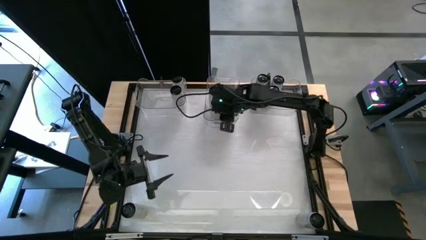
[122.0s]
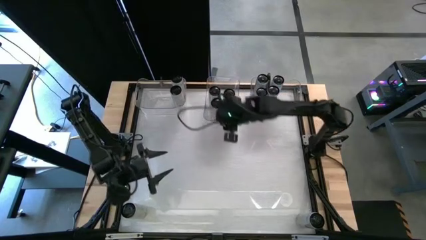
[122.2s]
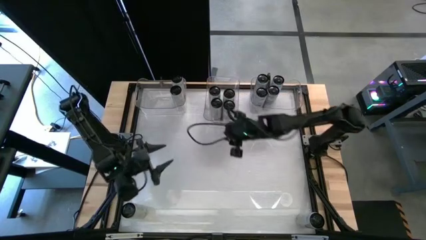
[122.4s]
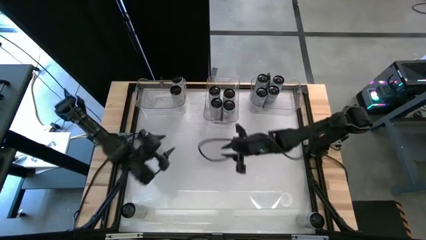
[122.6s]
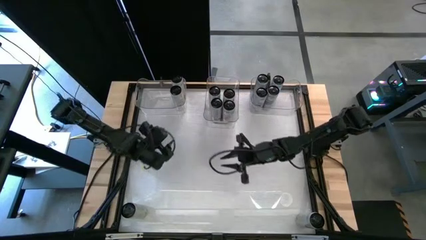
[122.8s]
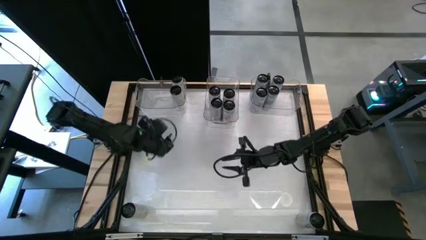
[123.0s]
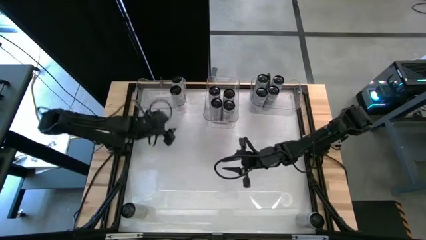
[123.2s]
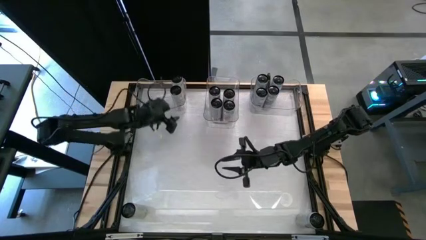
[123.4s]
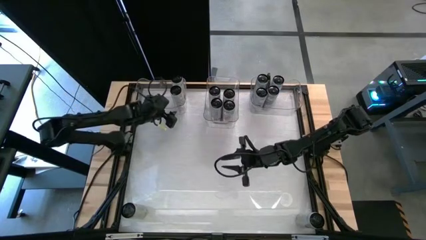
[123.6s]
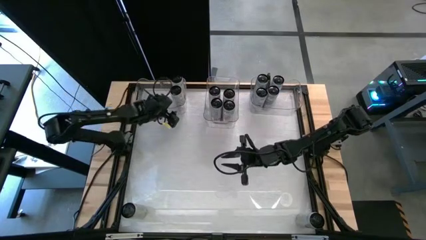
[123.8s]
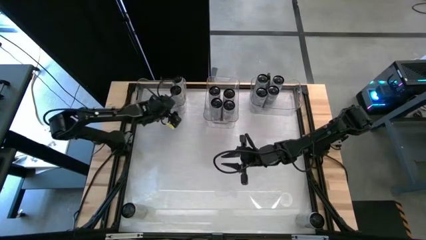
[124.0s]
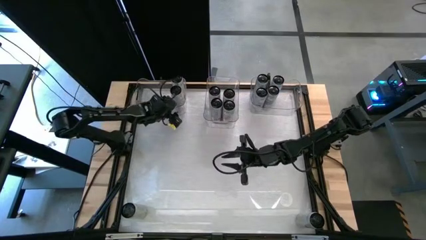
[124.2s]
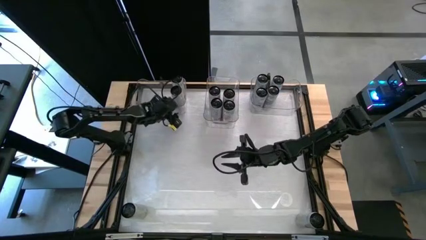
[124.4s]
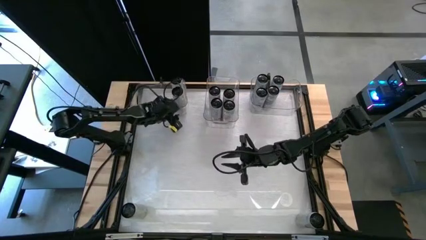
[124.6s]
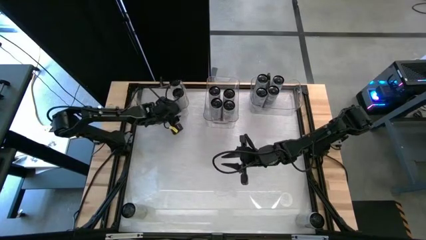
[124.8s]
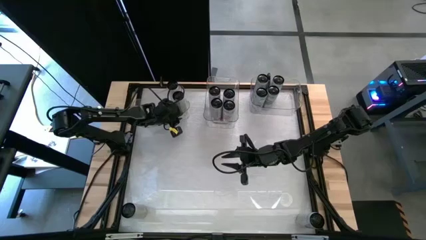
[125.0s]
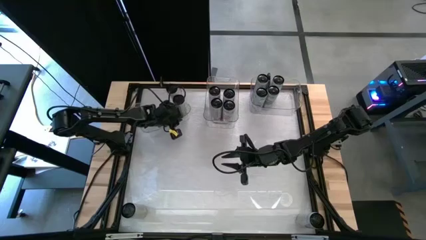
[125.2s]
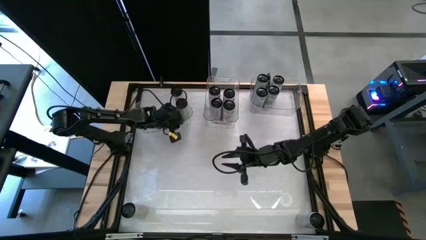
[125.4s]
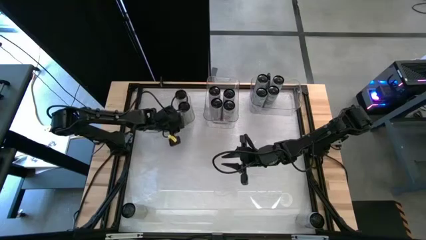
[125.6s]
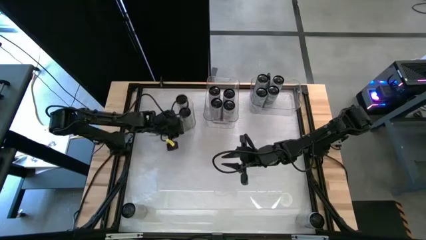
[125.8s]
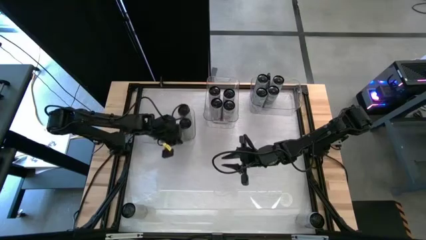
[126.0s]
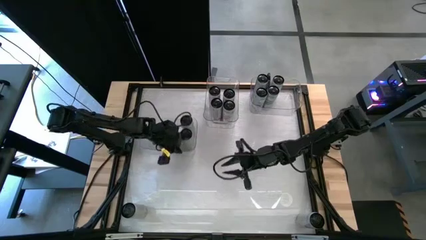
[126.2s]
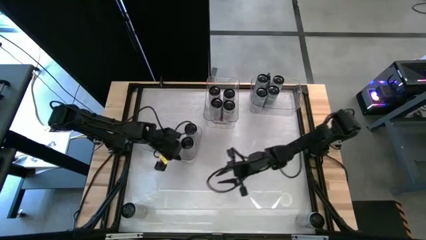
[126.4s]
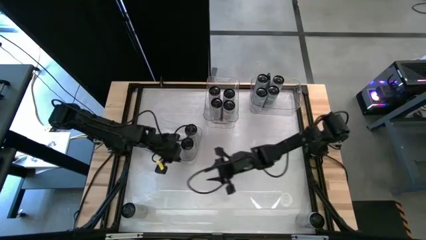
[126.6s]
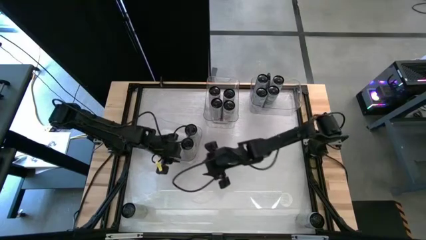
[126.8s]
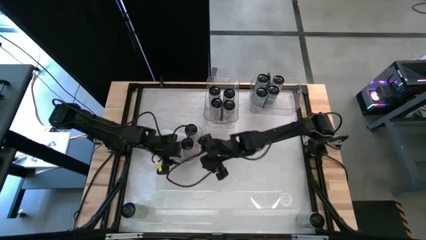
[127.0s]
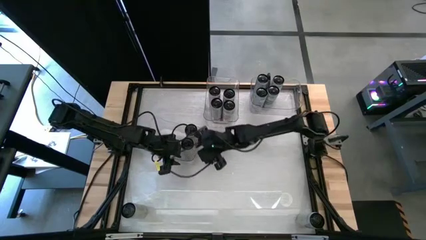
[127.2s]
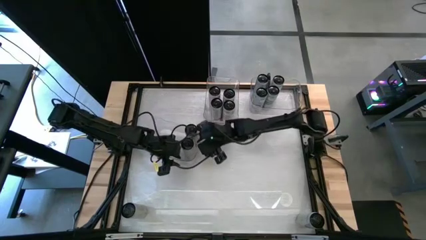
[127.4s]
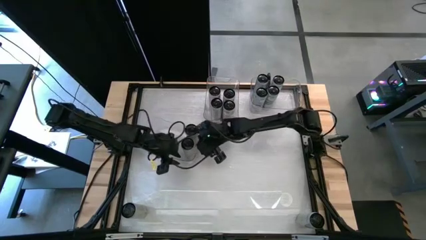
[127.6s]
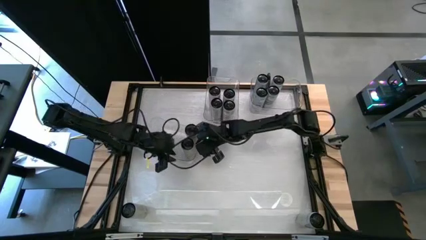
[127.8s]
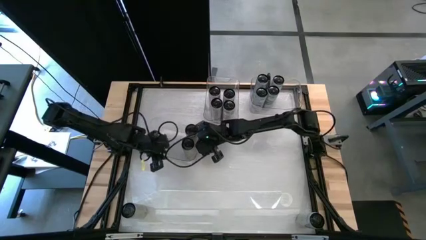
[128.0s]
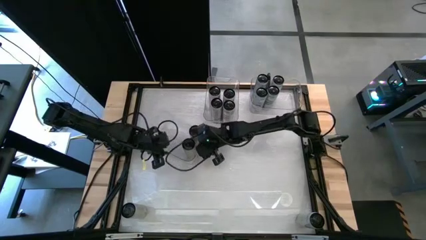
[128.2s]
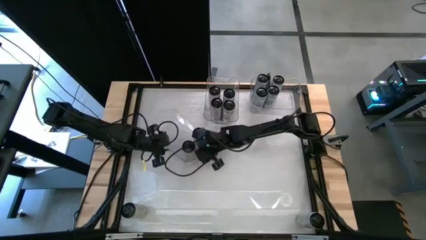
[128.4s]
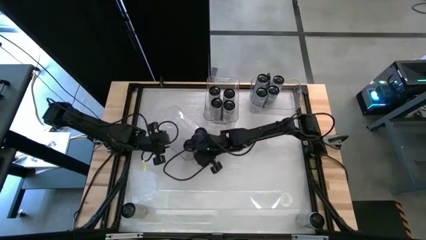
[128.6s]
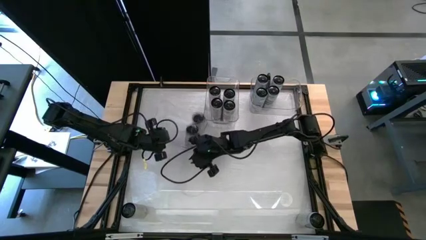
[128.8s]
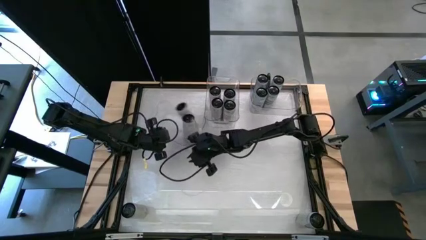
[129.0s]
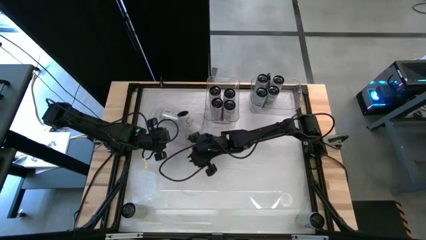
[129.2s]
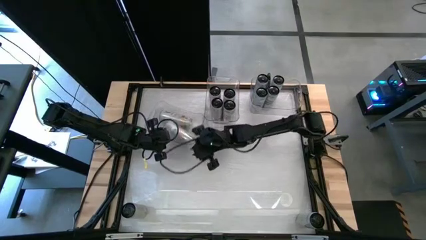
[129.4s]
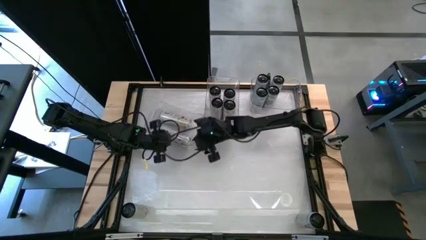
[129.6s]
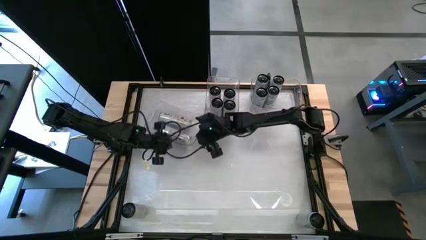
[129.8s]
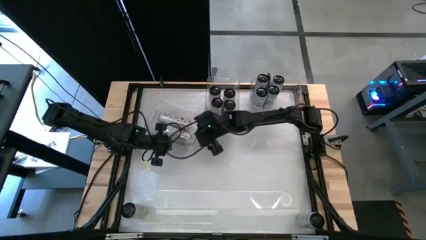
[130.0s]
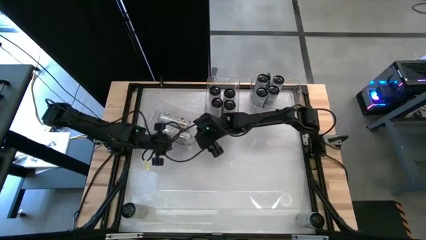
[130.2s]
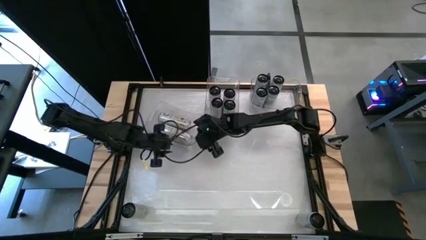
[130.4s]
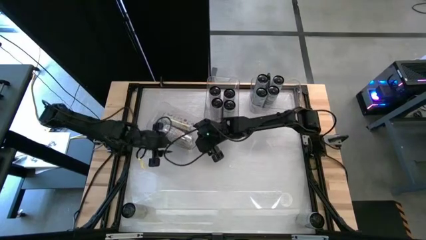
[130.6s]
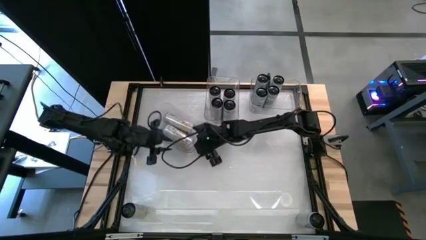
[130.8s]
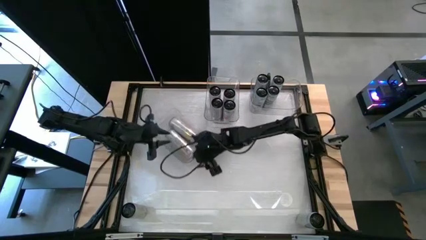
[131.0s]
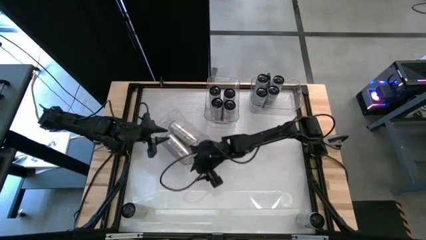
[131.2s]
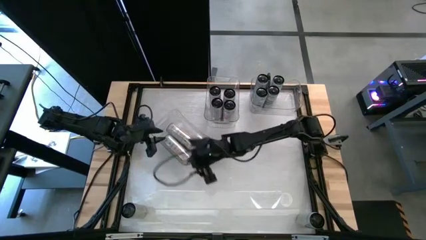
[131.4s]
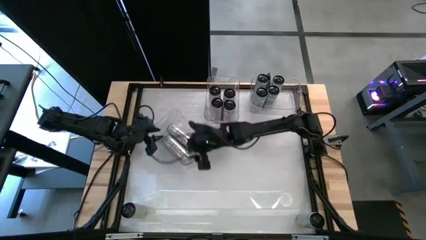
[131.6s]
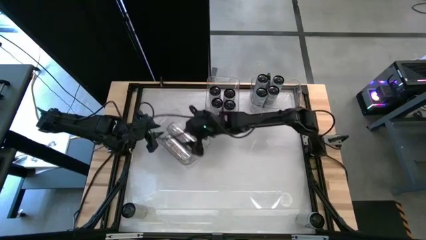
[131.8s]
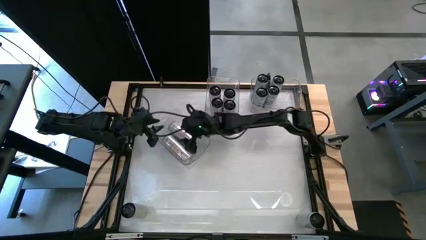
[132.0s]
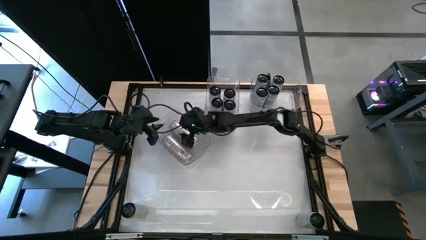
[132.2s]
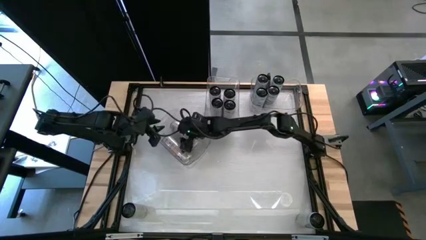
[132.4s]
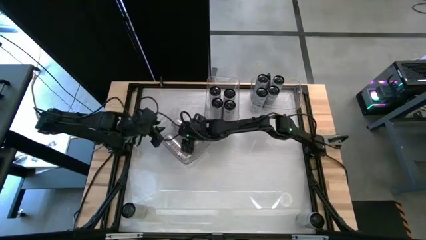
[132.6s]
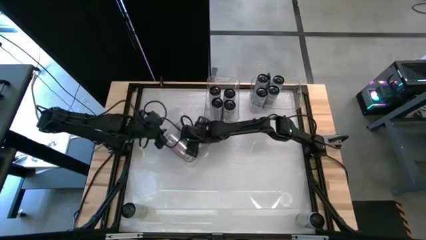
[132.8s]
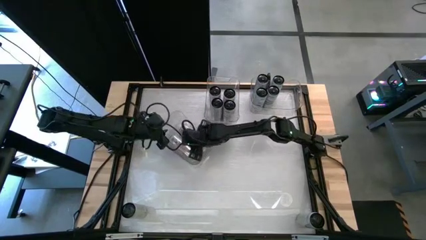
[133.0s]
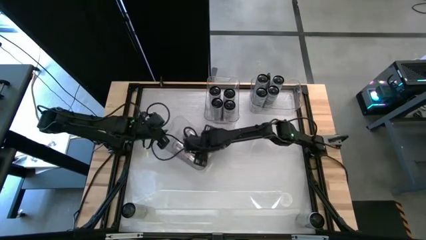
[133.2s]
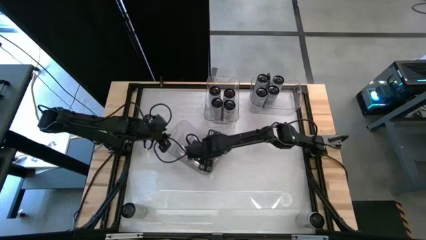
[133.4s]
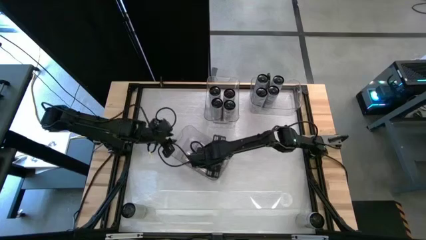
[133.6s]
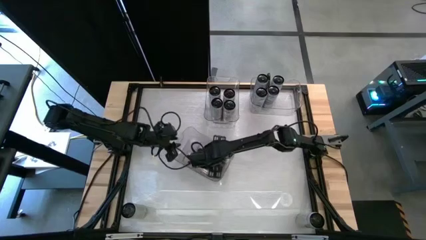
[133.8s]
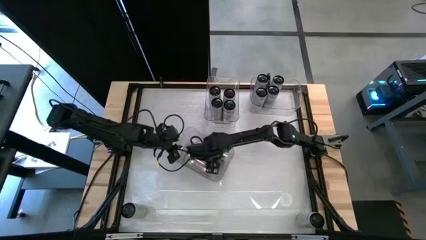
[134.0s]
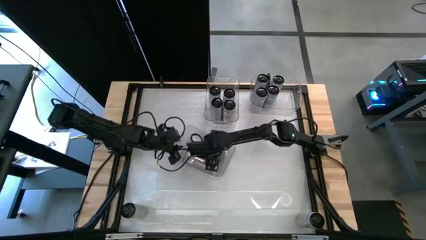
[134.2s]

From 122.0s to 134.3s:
Task: Sort soda cans
Move the top left transparent bin to the center of the table

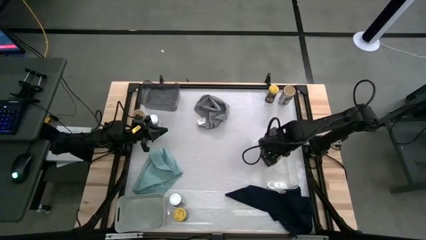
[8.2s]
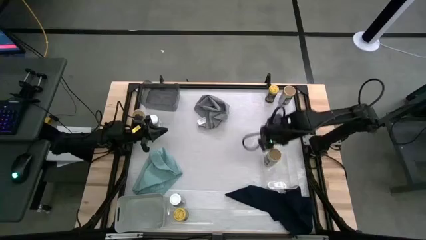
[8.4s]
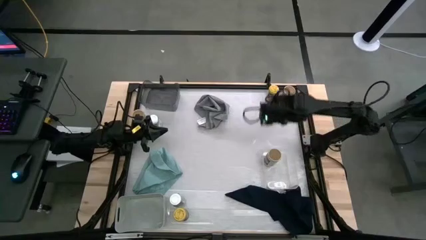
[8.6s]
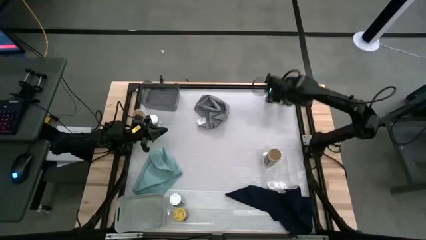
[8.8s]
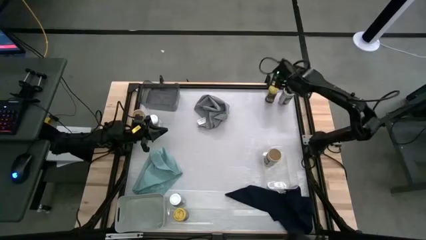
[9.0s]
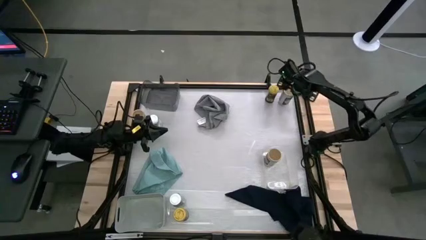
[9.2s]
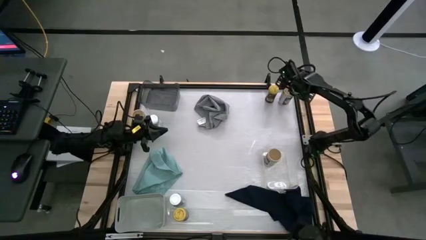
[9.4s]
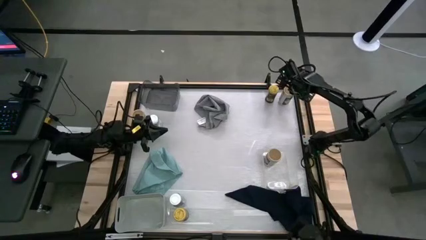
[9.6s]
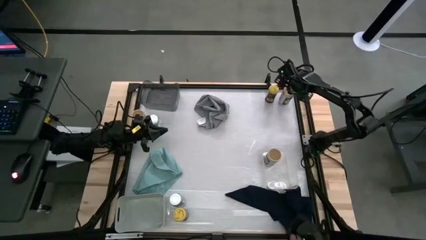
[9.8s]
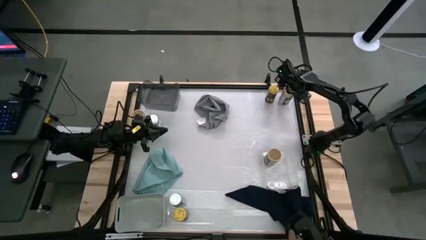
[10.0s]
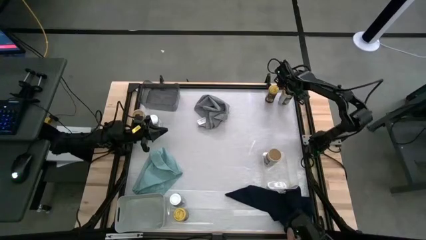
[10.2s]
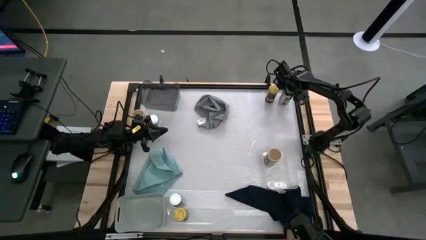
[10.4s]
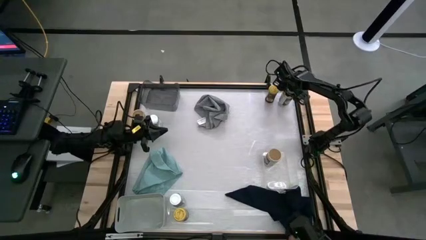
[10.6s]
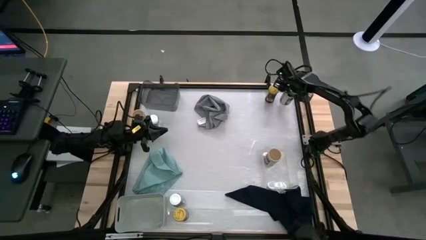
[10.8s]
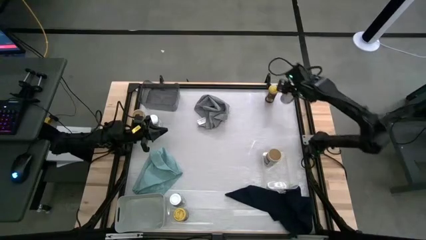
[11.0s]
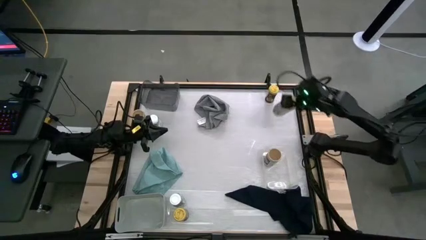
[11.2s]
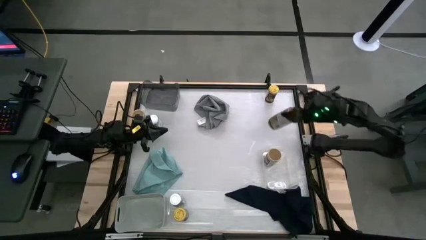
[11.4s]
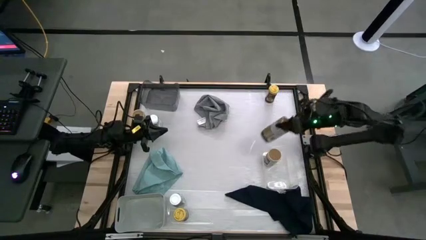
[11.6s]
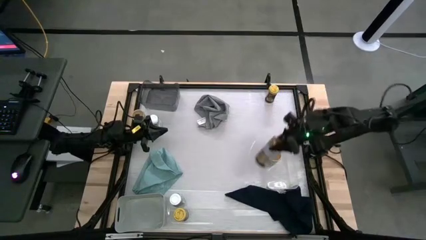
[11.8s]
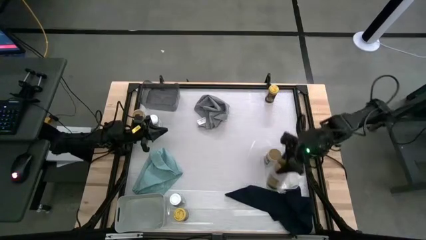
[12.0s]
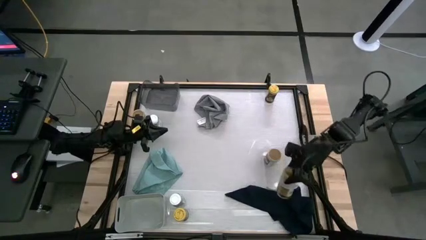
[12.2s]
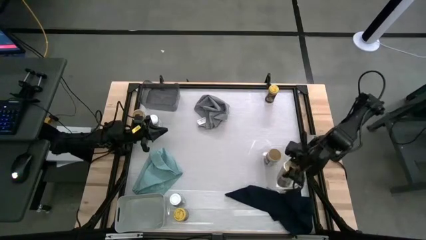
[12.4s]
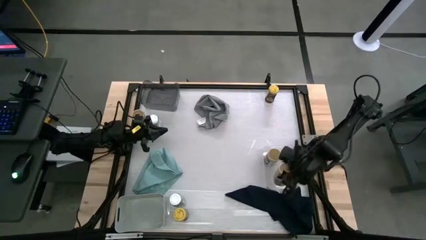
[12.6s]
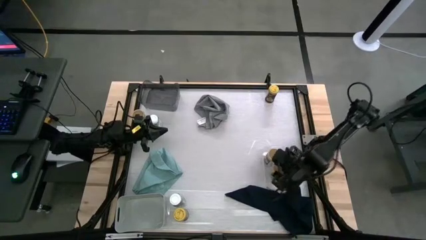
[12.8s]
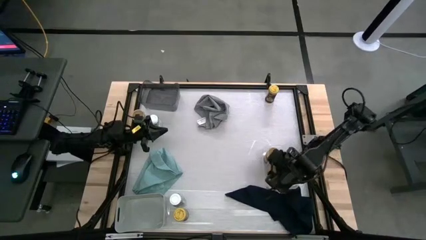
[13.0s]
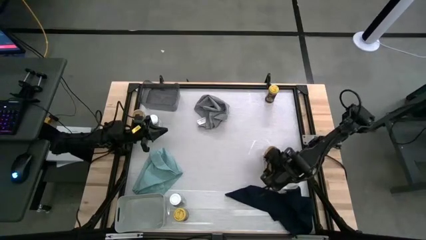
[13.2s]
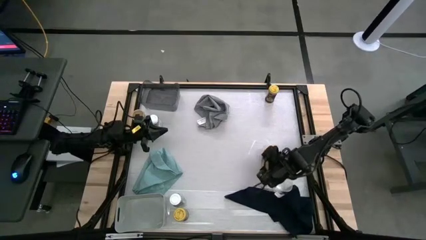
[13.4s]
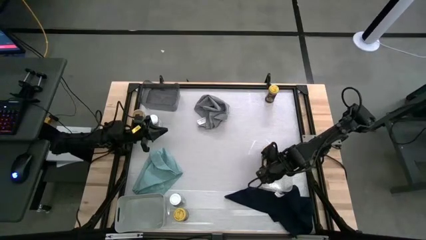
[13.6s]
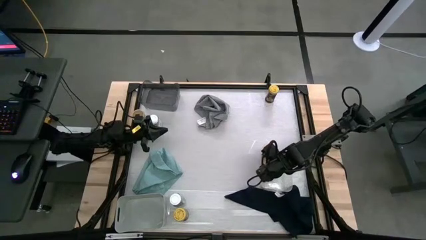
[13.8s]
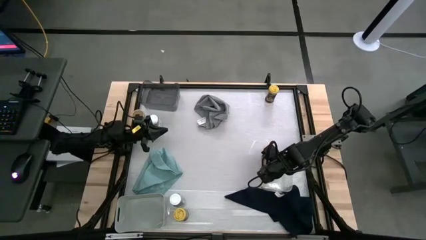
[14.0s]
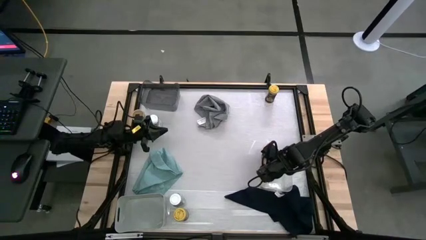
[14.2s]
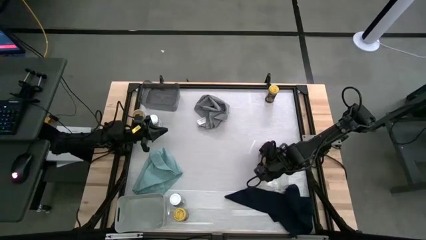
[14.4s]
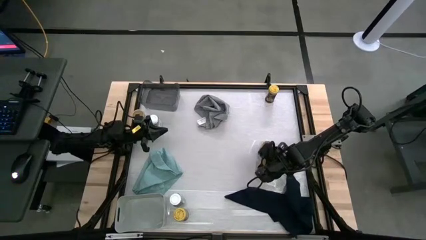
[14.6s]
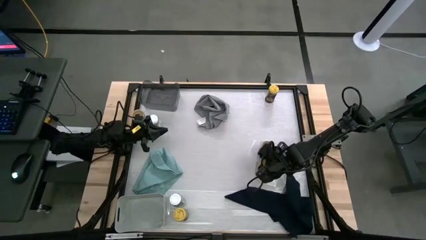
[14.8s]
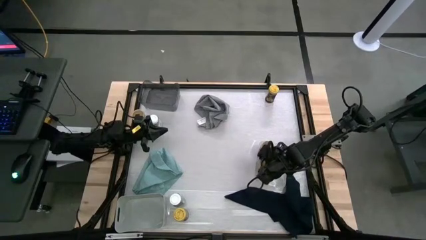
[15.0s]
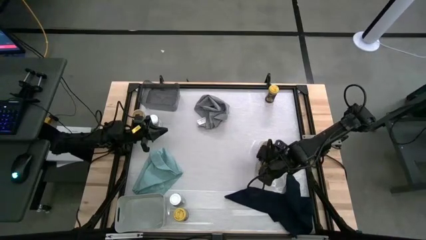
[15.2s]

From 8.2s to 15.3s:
Task: Sort spices by type
Put the top brown seasoning bottle into the transparent bin
